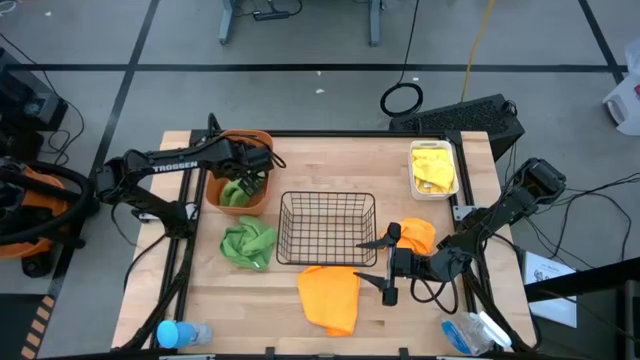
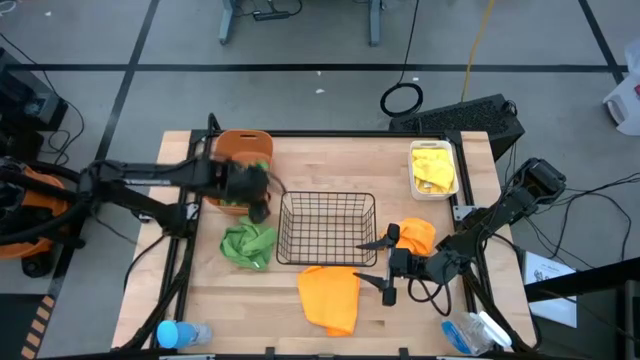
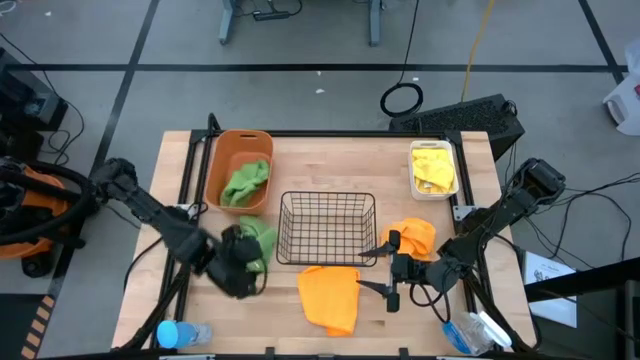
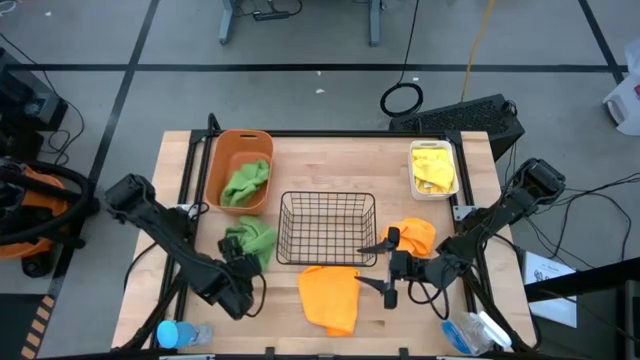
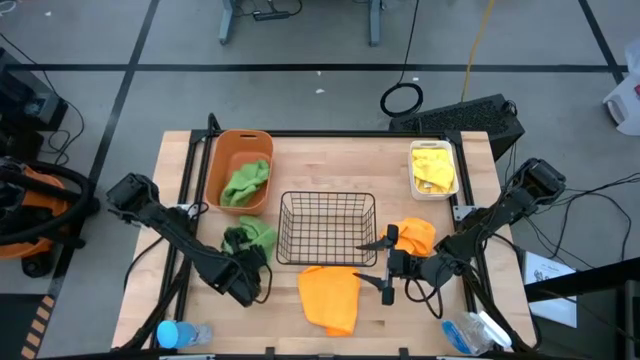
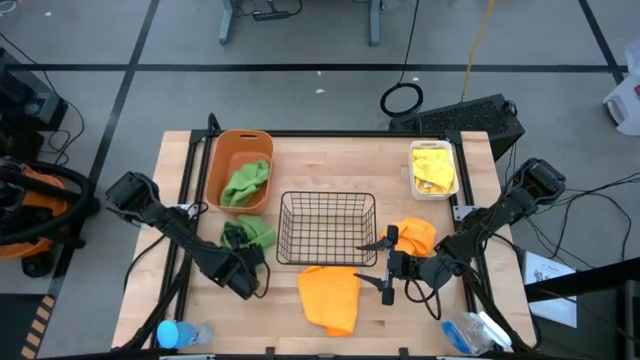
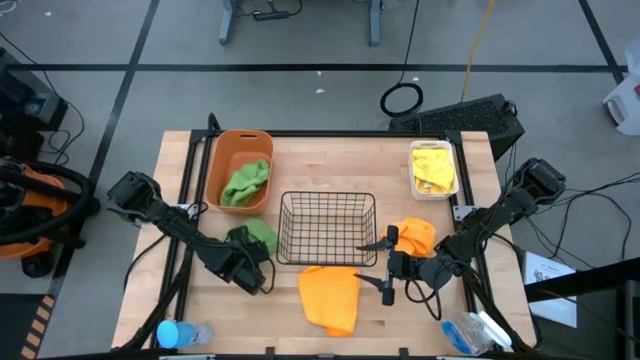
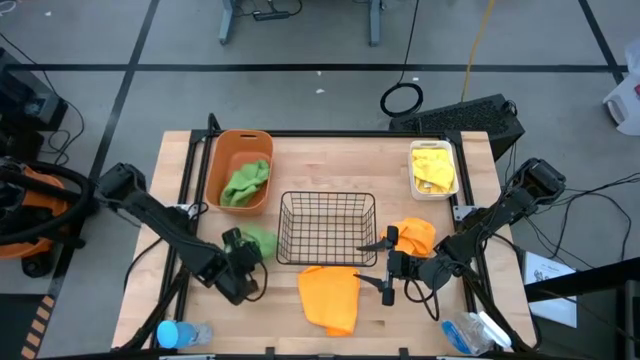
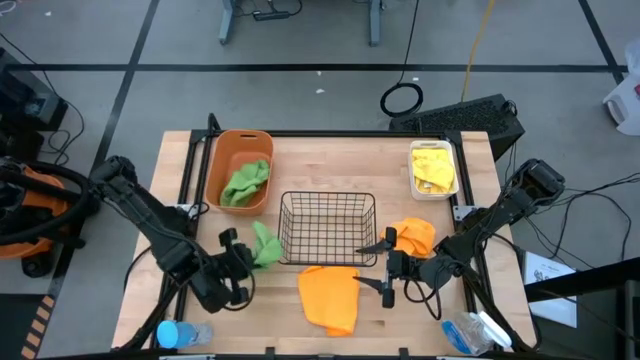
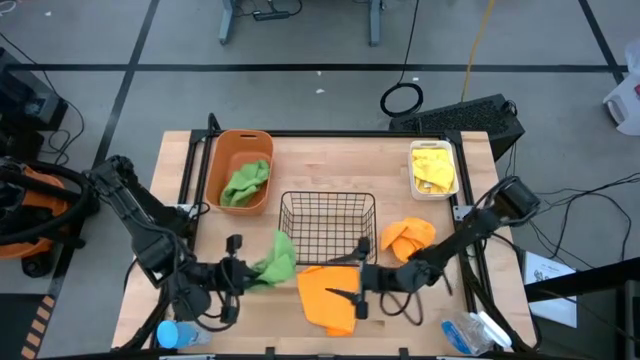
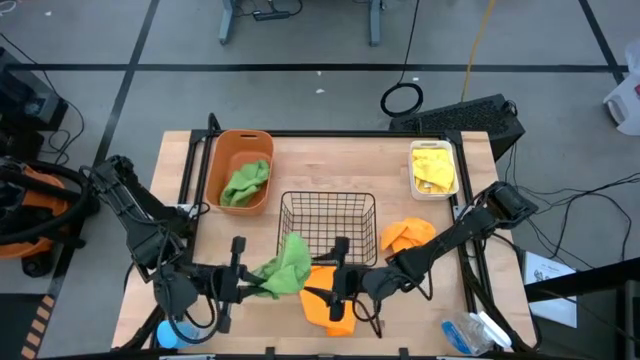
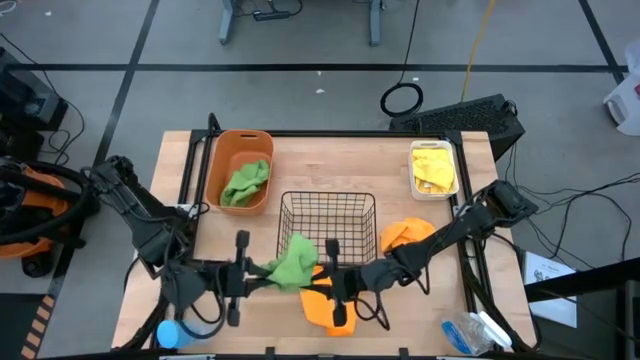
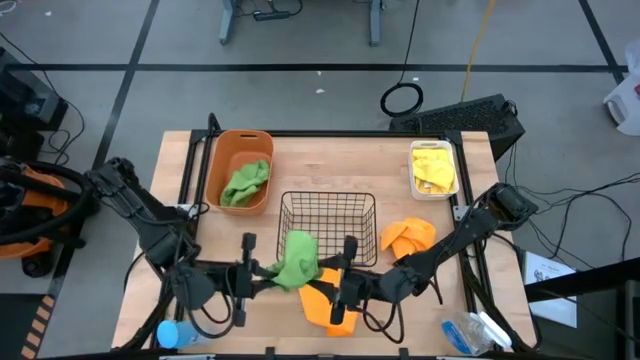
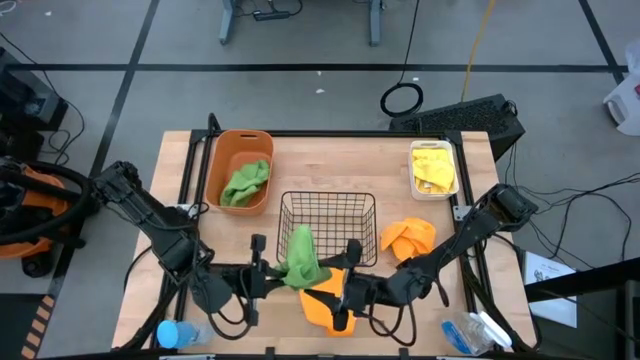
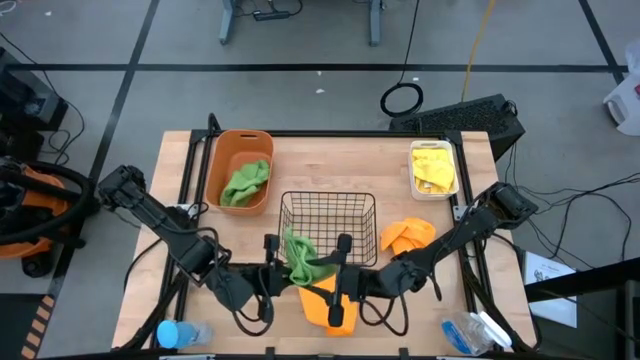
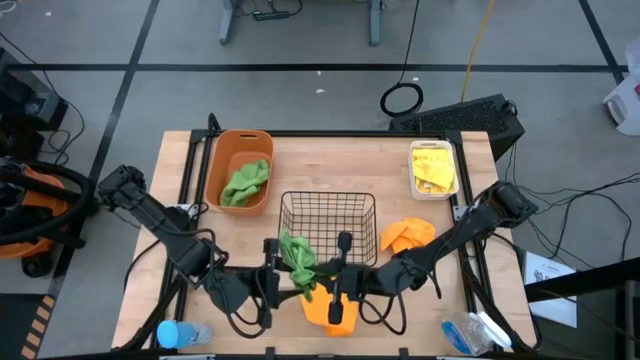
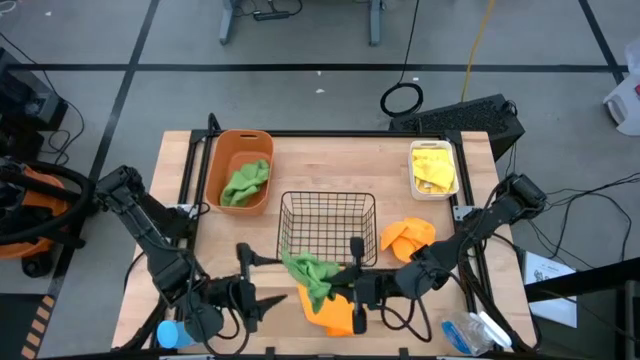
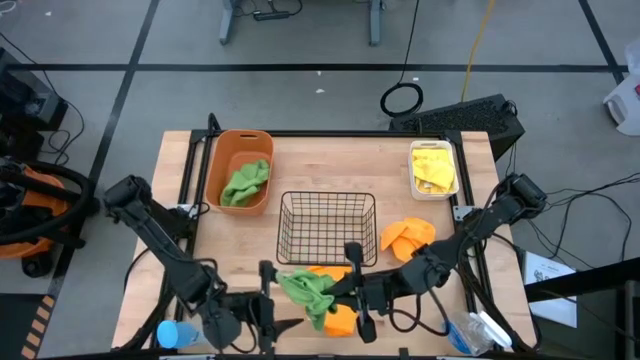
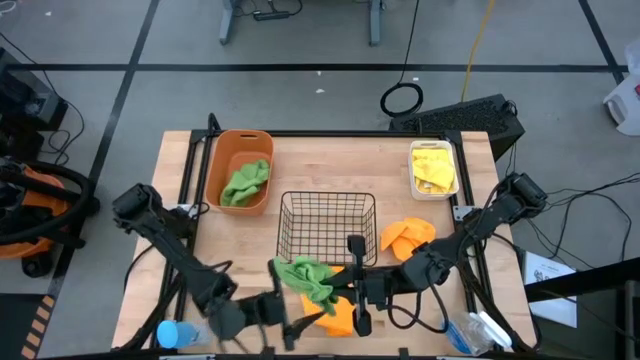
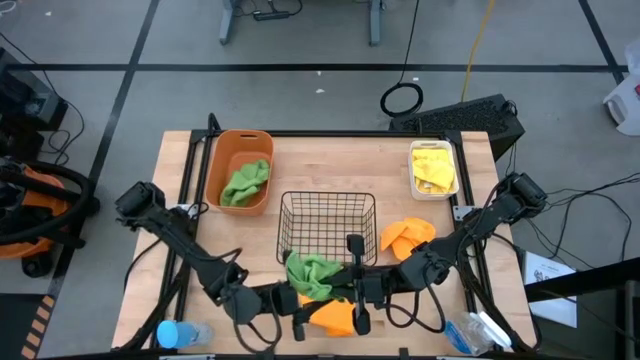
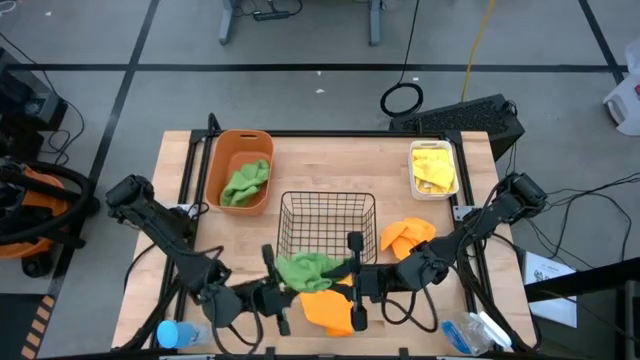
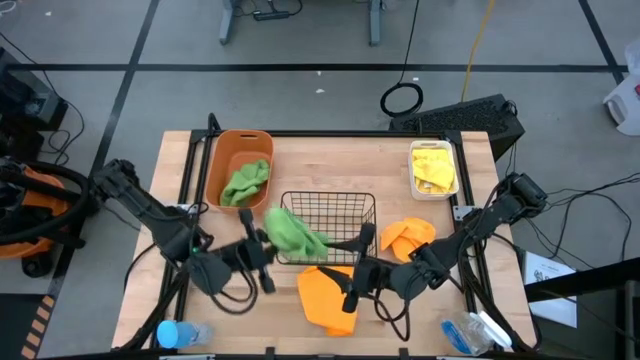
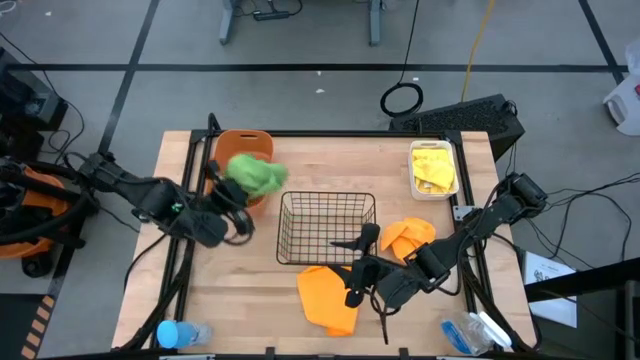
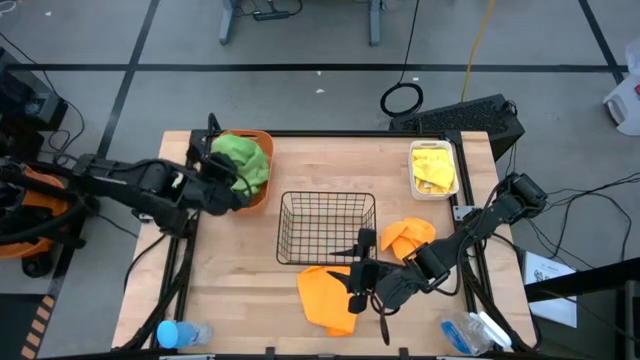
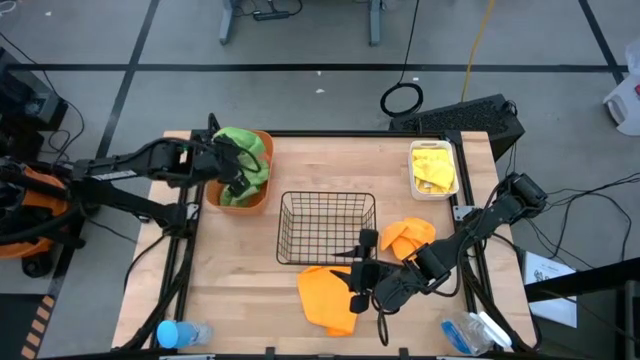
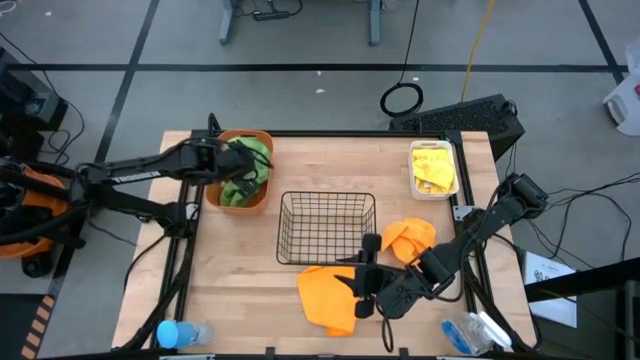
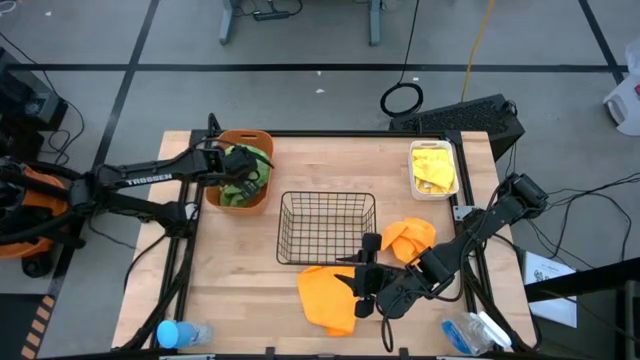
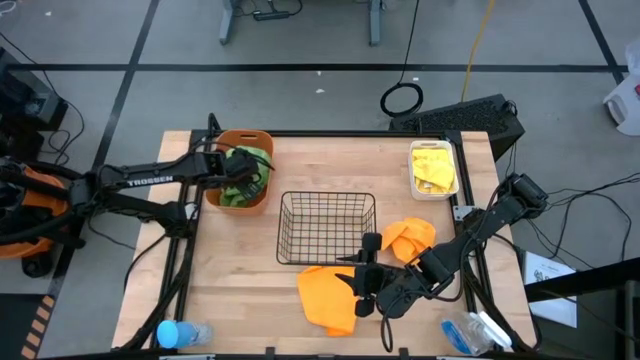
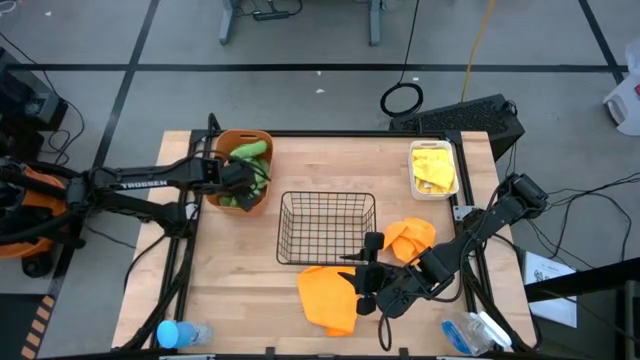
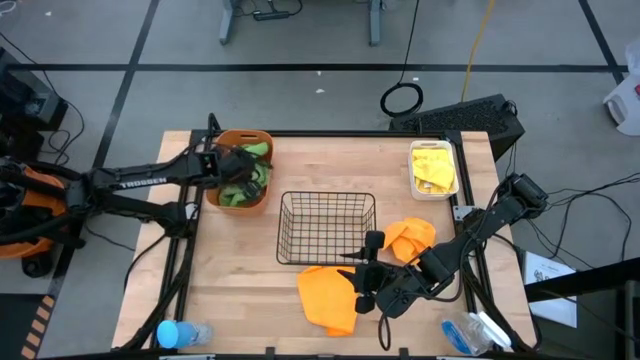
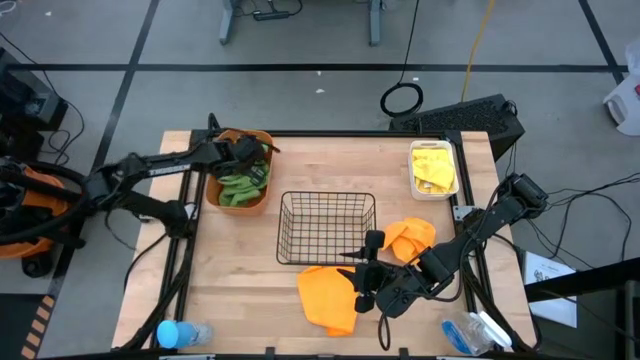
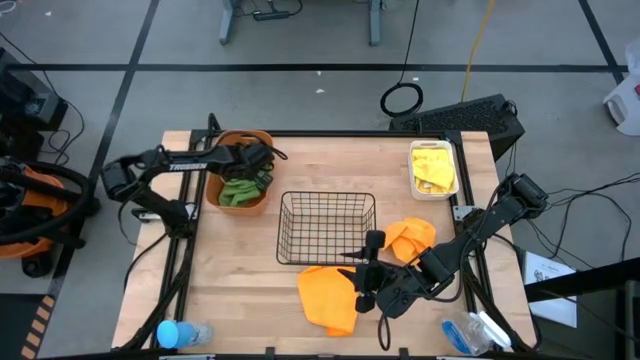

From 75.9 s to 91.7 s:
Task: Sort microfiber towel by color & place in baskets
Put the green microfiber towel into the orange bin

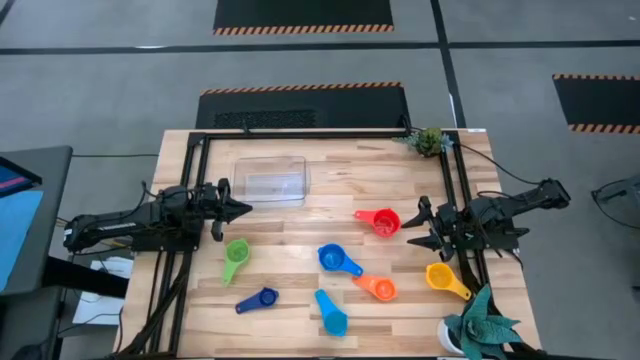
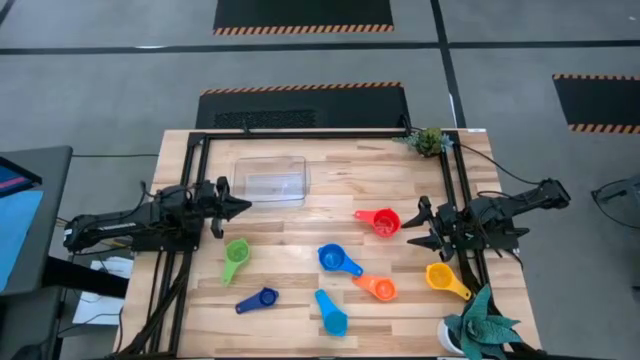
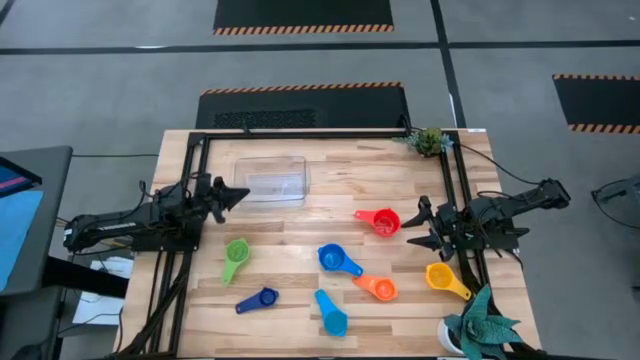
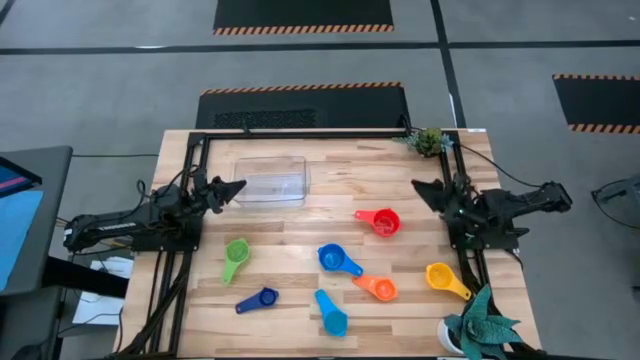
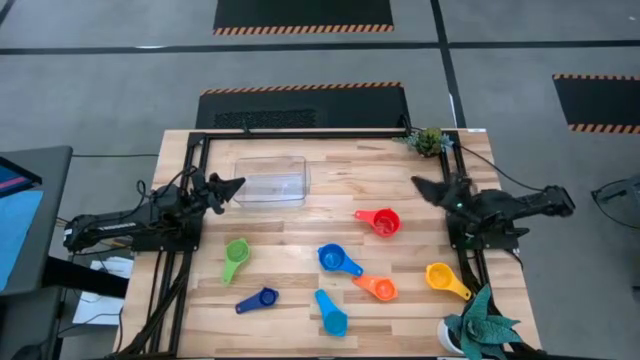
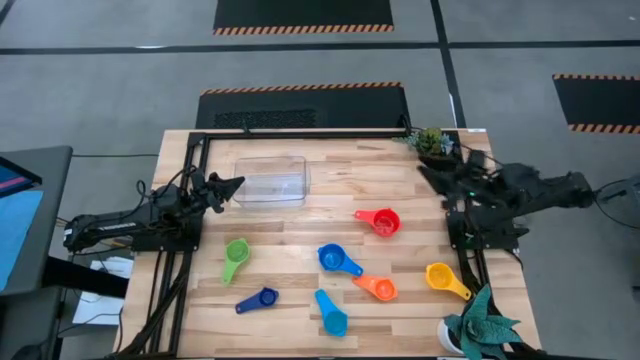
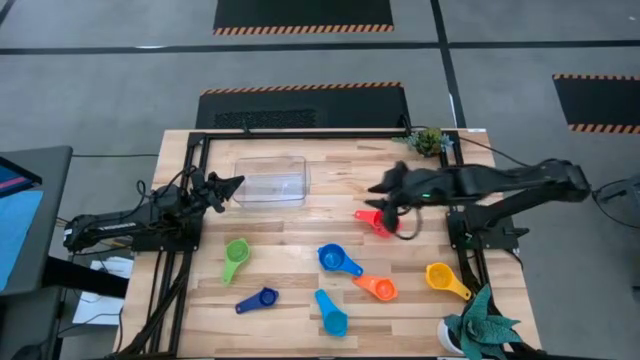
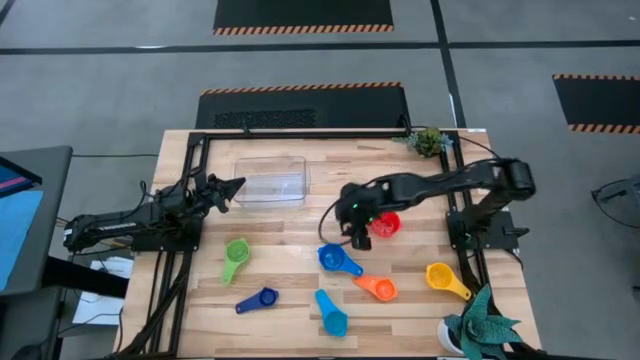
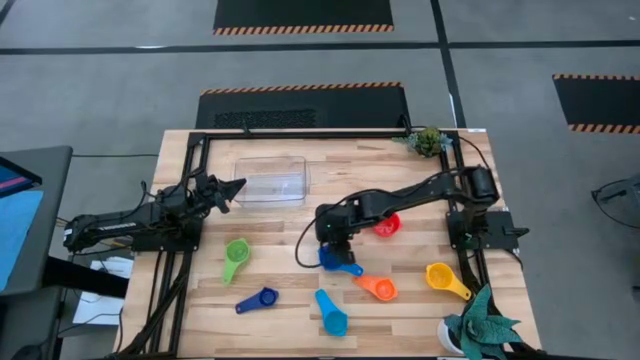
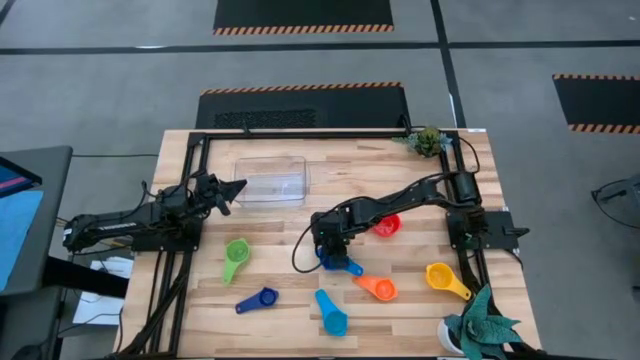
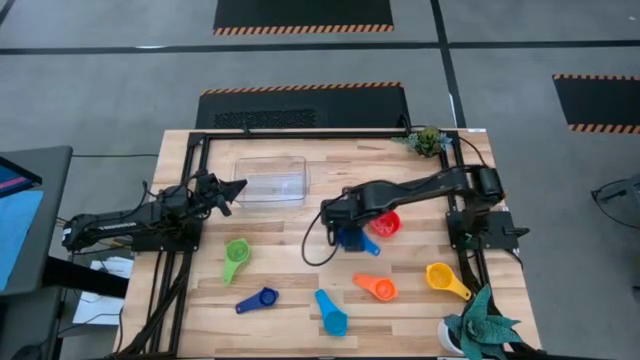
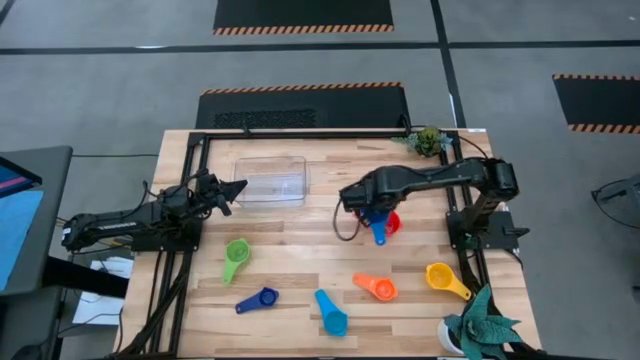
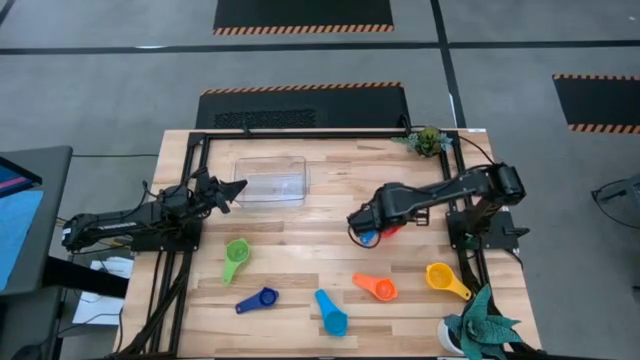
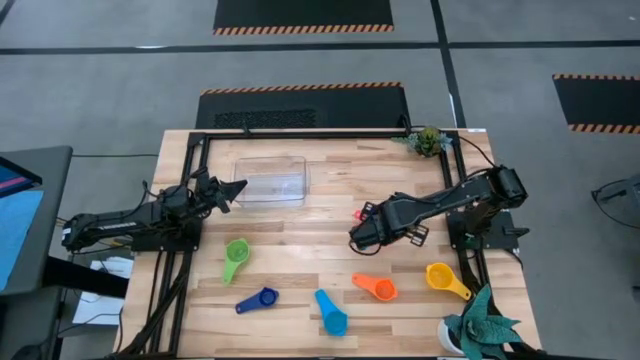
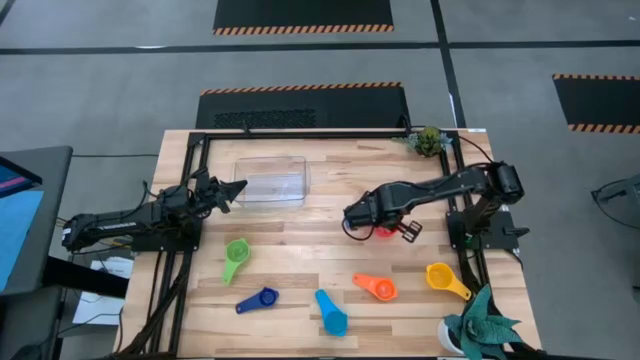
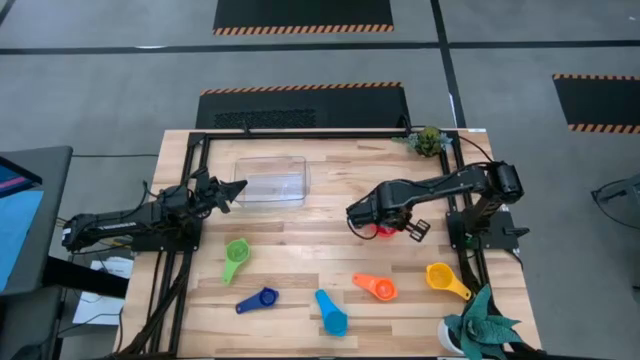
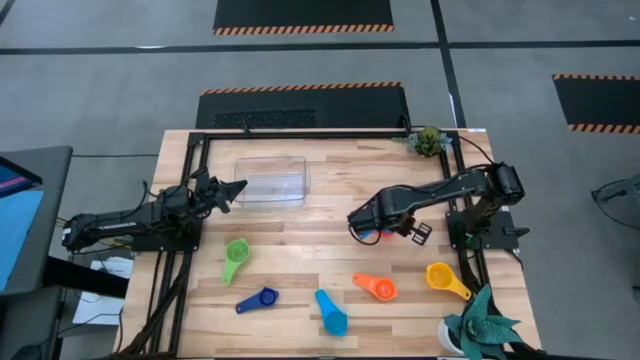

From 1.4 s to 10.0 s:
Task: Nest measuring cups in basket
Stack the blue measuring cup on top of the red measuring cup
